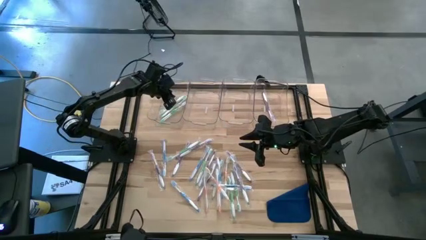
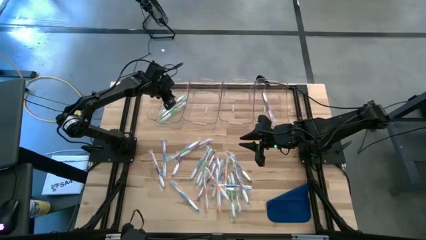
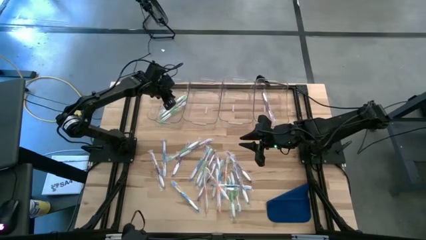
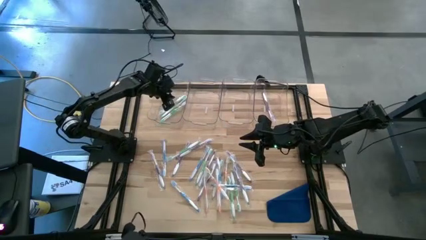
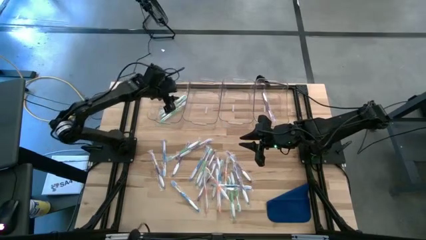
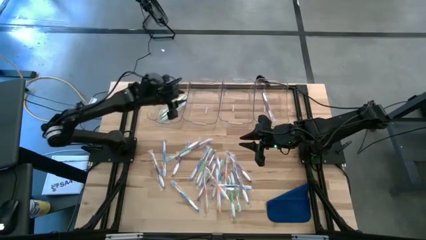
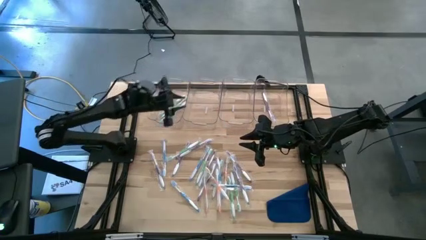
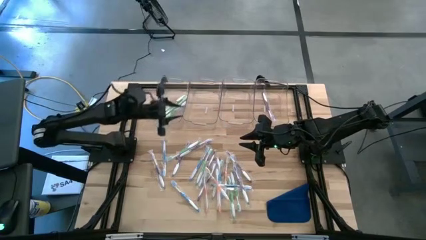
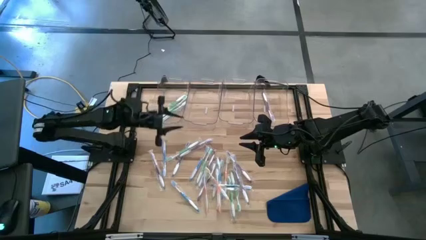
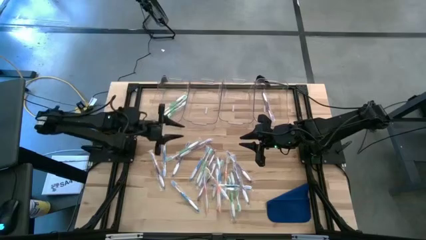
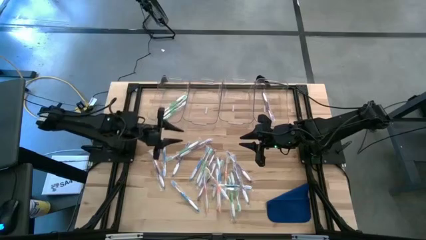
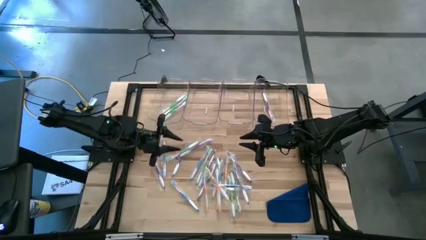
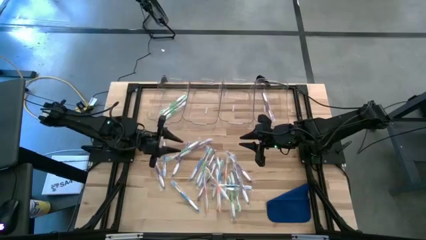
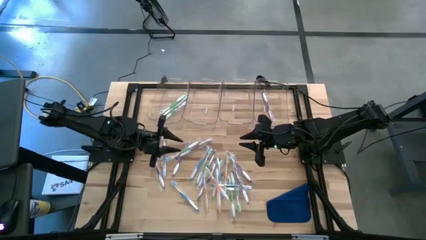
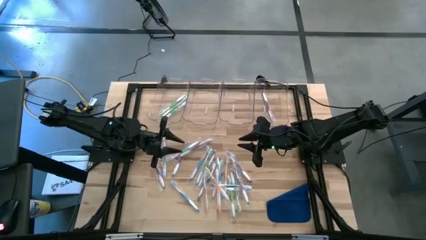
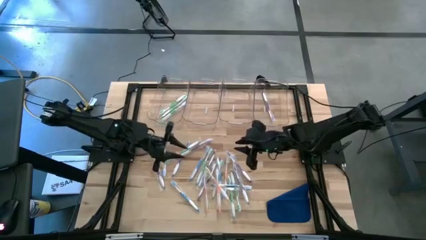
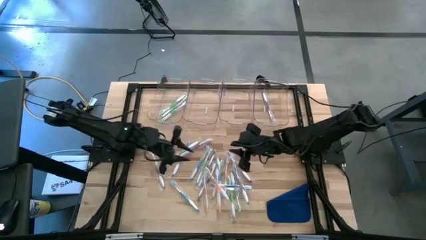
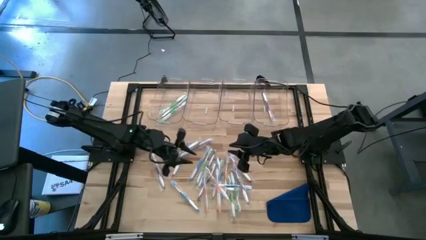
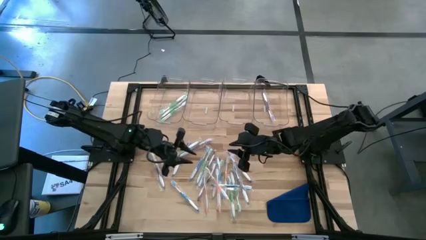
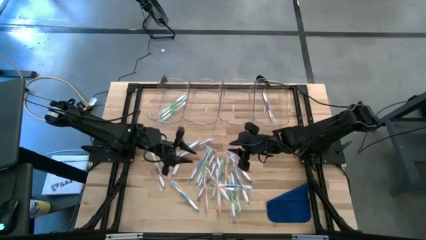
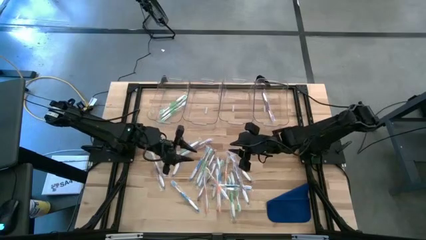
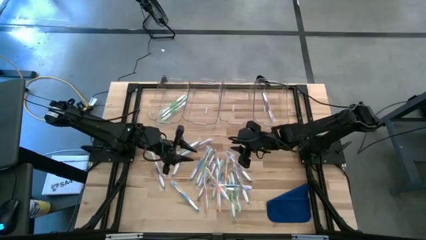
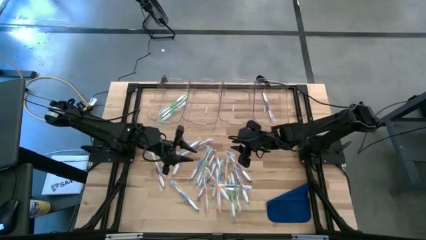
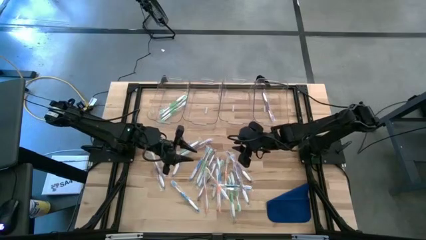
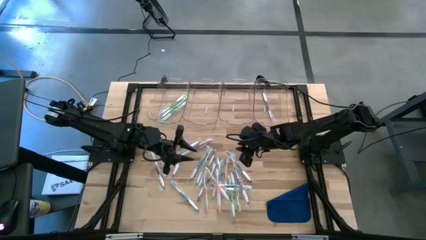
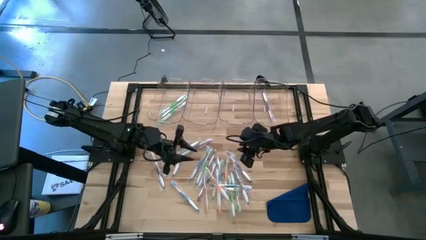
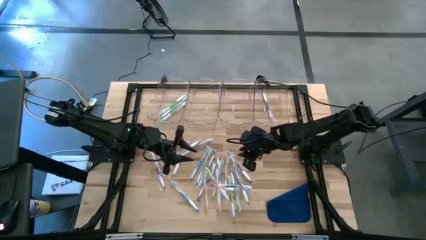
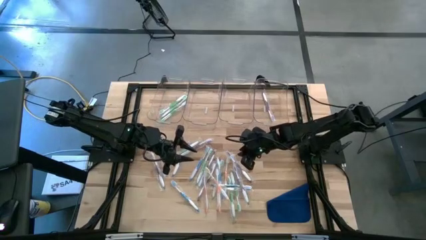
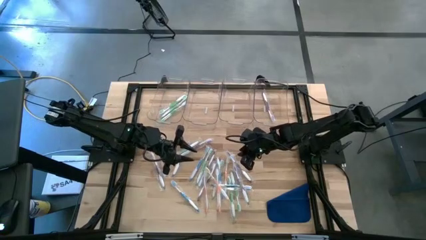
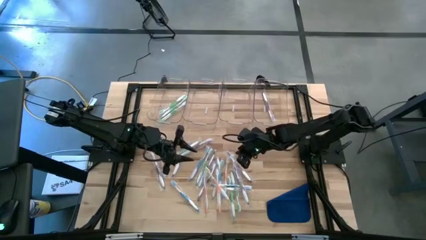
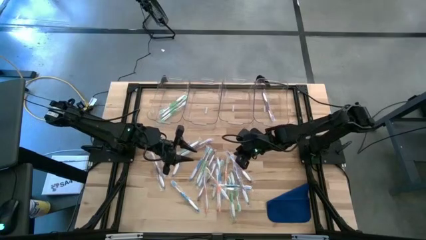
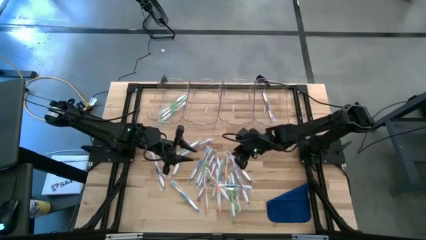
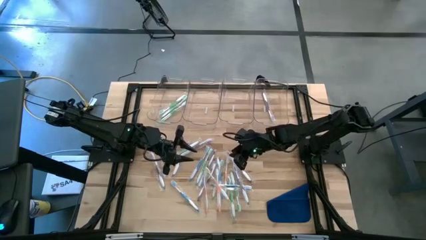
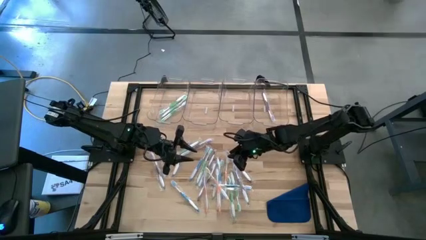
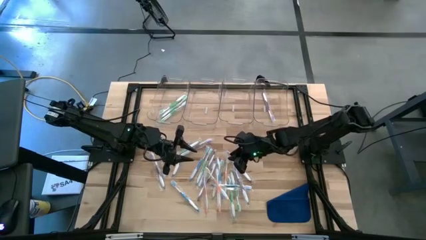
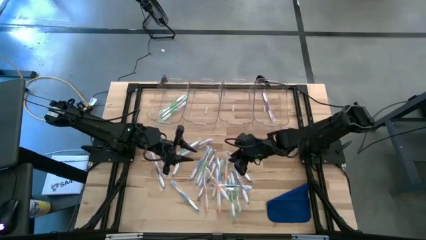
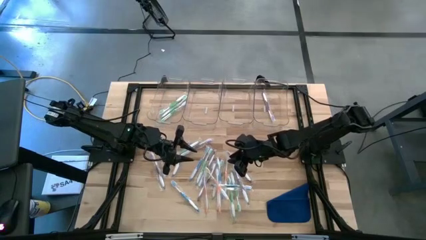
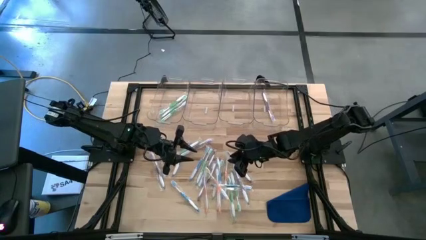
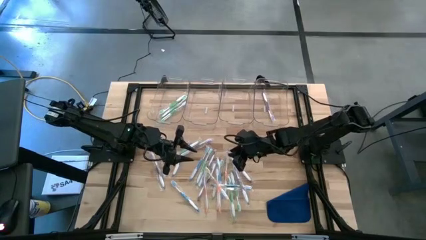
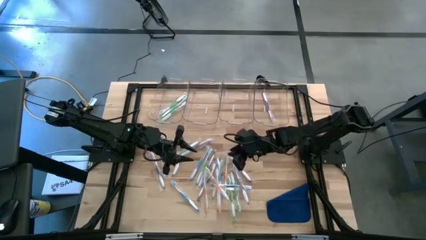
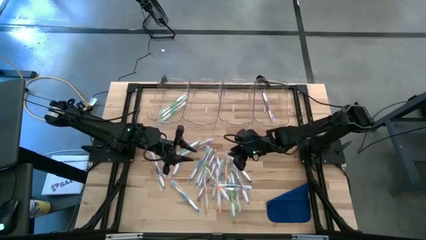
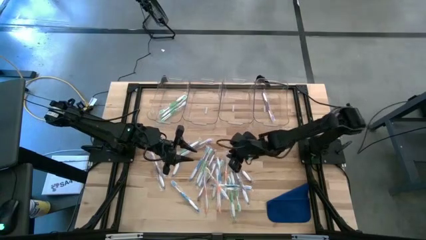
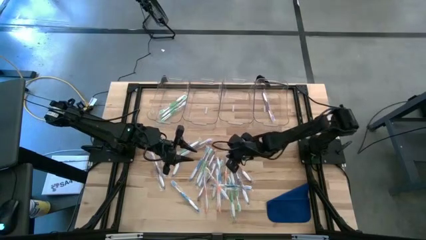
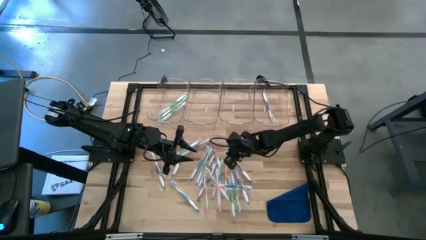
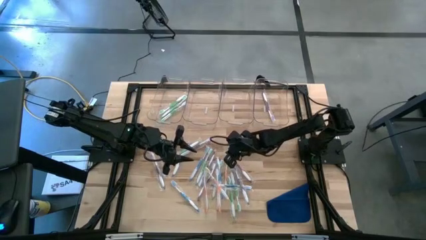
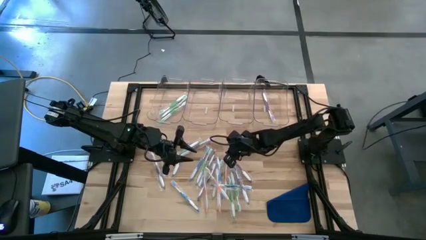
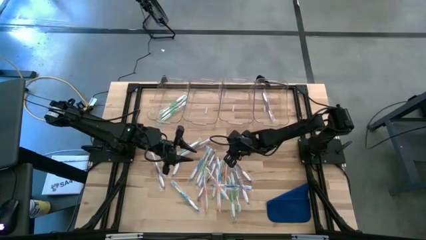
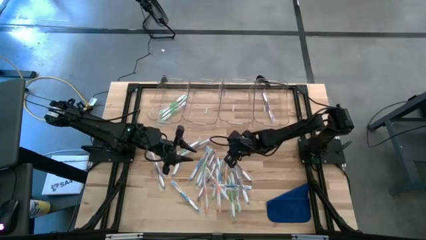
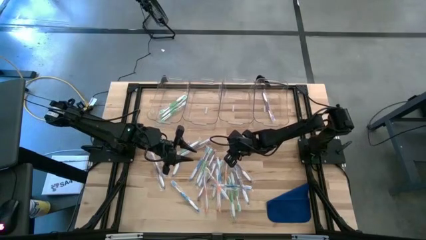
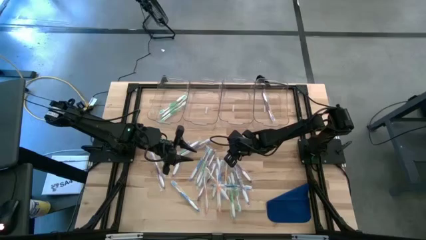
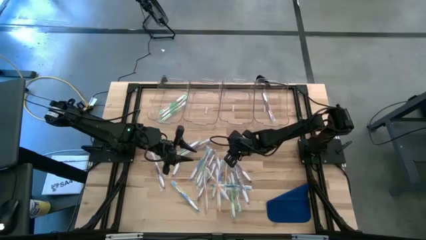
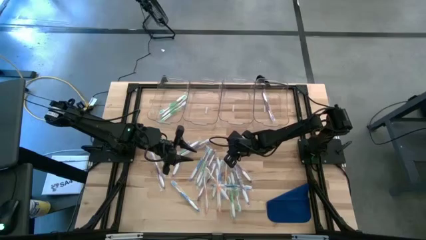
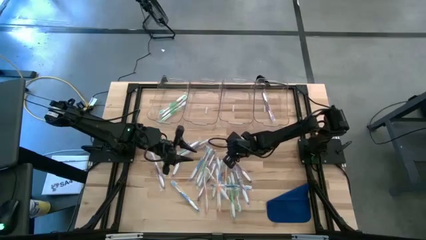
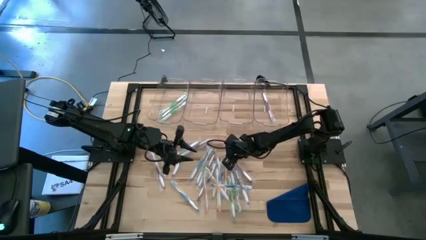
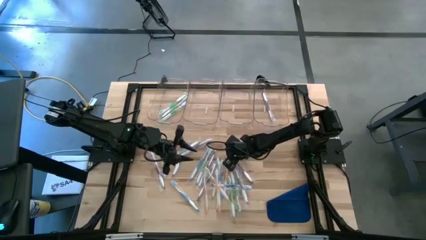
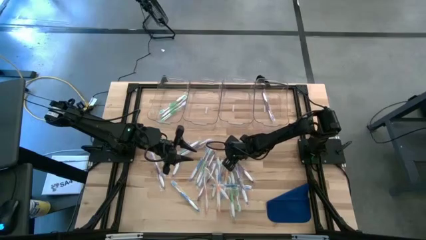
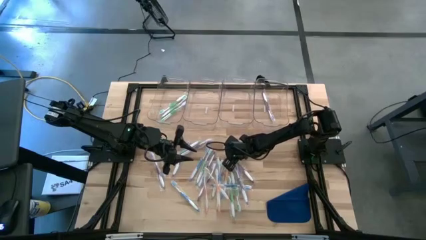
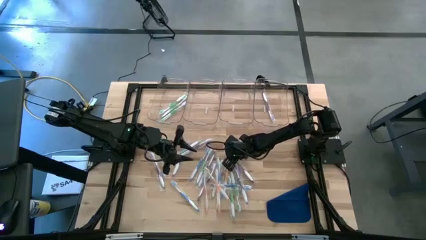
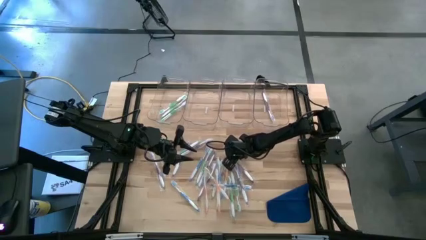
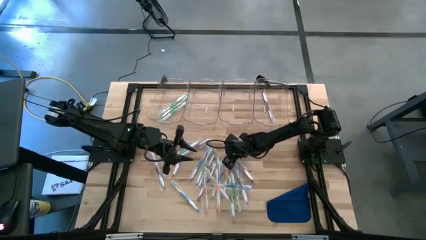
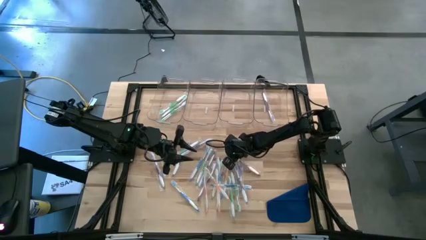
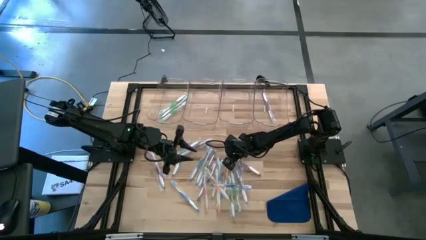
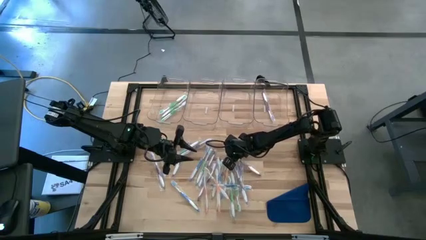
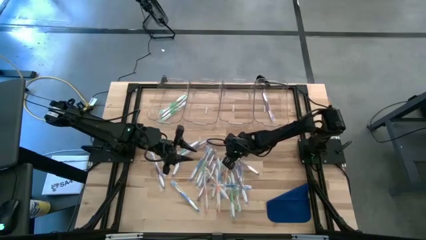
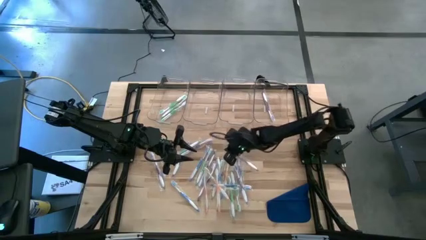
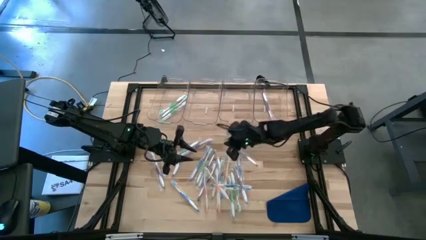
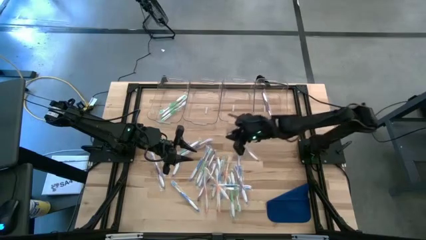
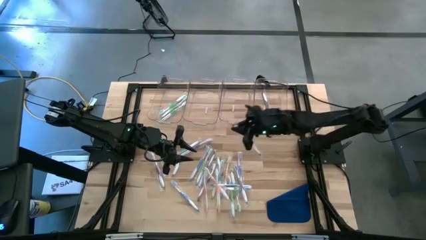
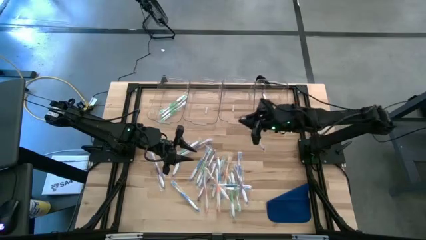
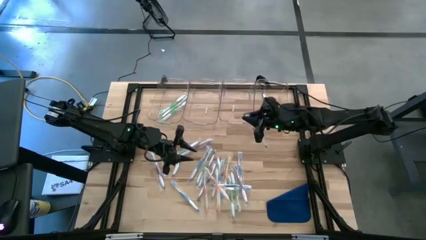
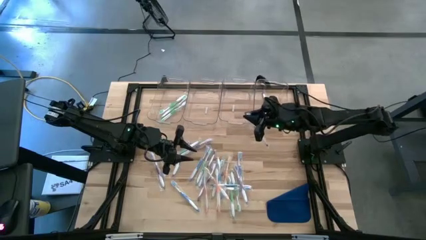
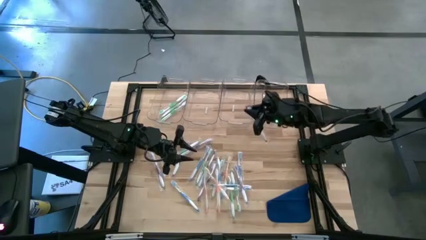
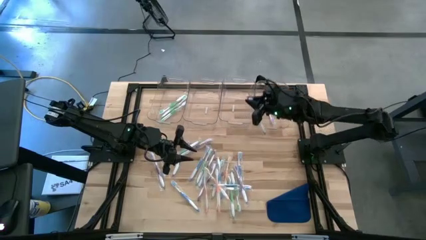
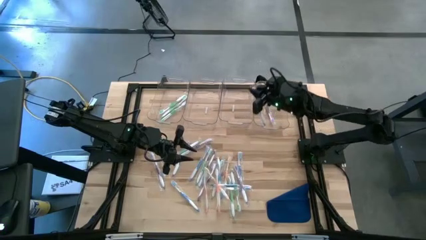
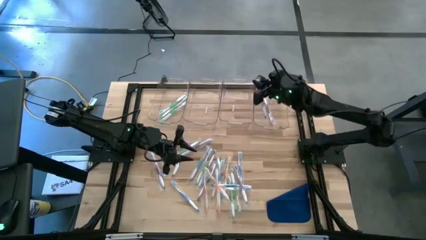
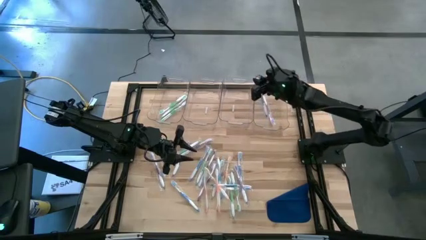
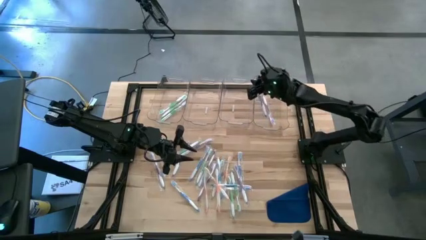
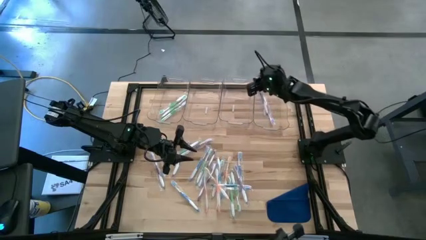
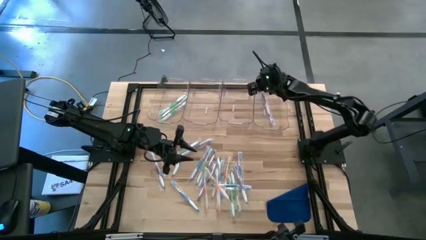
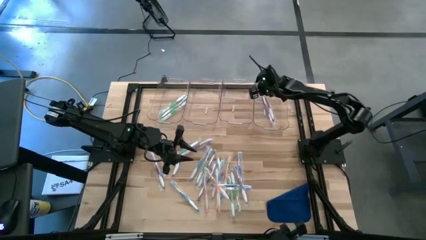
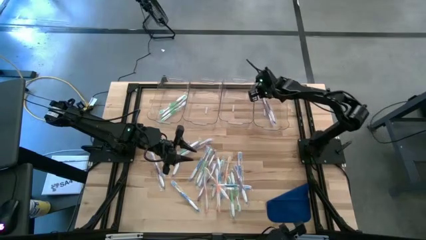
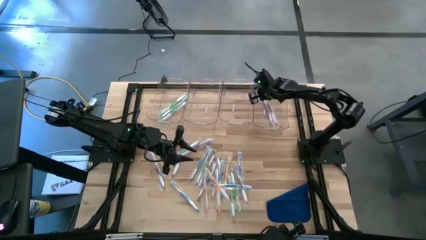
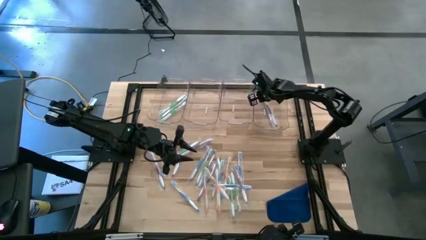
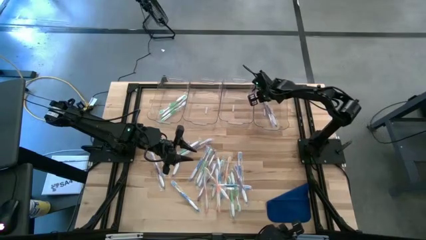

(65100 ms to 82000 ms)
Task: Pick & Place Toothbrushes
Put the violet toothbrush into the right transparent bin
